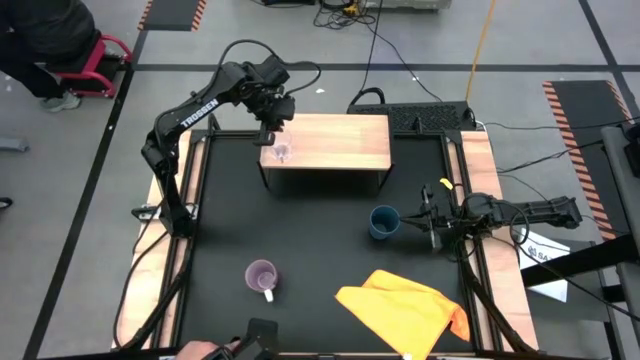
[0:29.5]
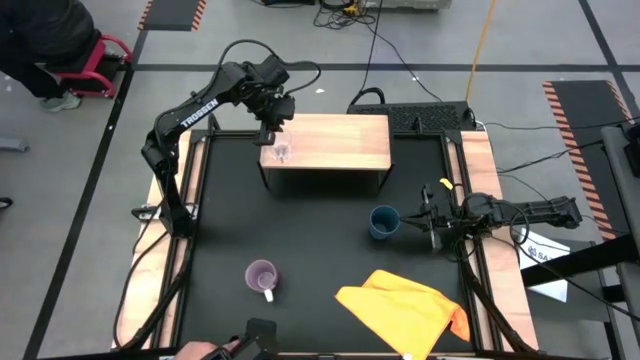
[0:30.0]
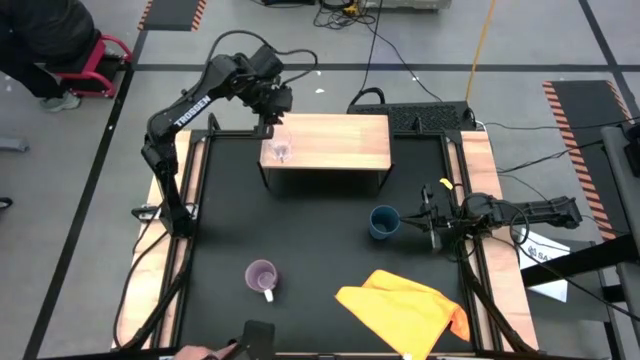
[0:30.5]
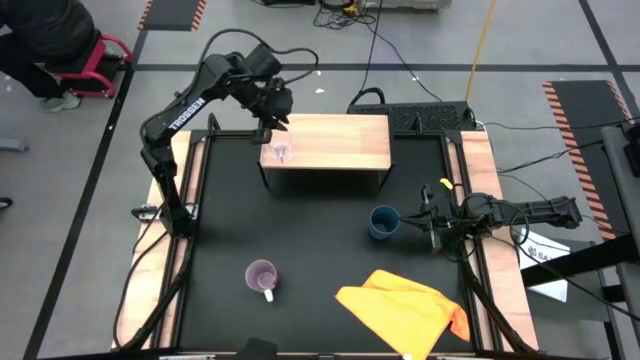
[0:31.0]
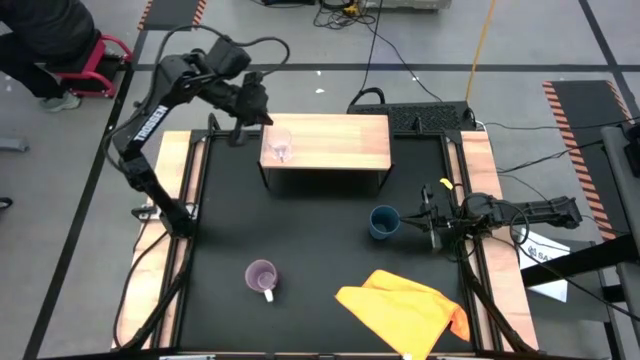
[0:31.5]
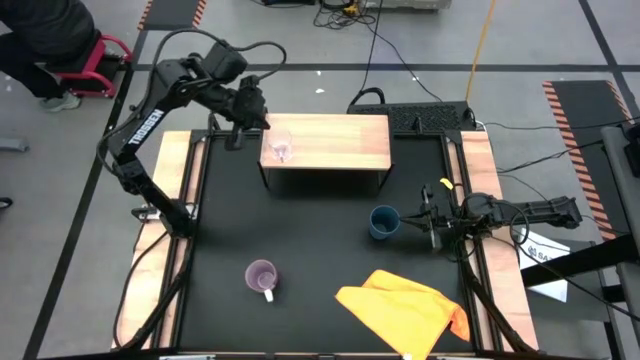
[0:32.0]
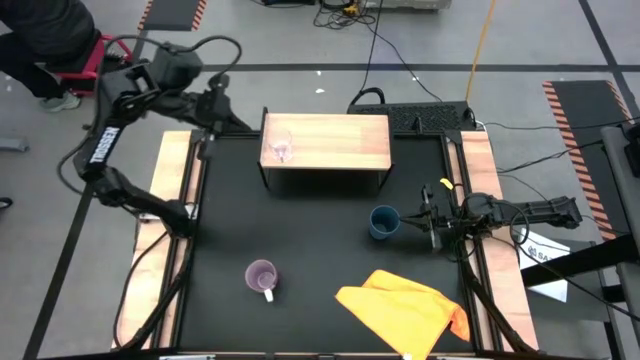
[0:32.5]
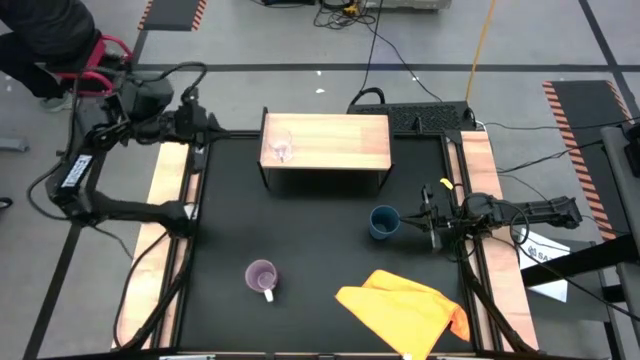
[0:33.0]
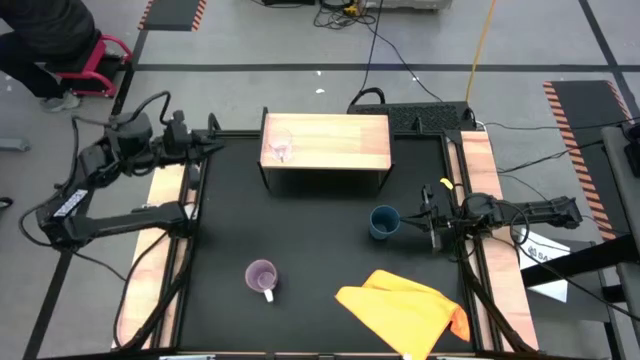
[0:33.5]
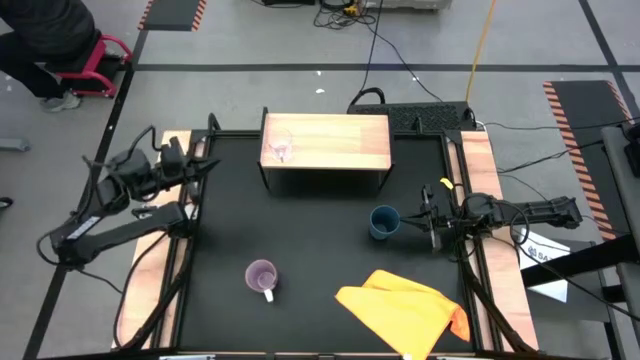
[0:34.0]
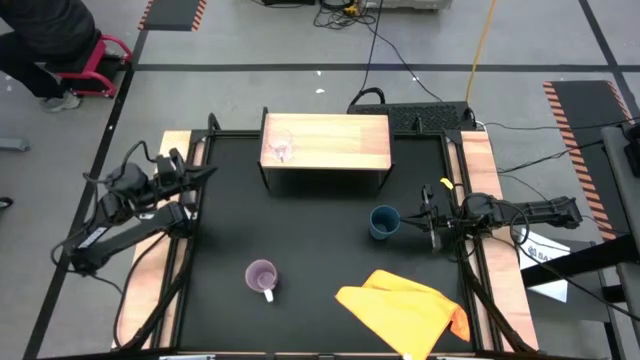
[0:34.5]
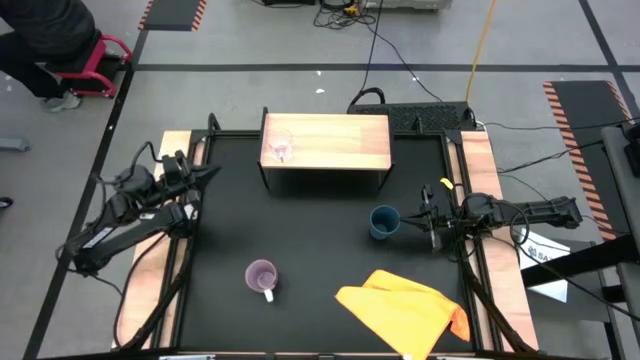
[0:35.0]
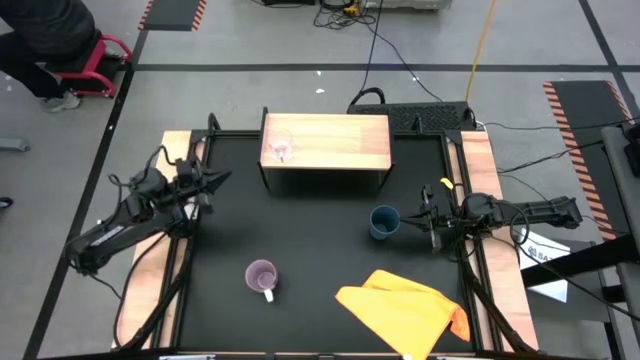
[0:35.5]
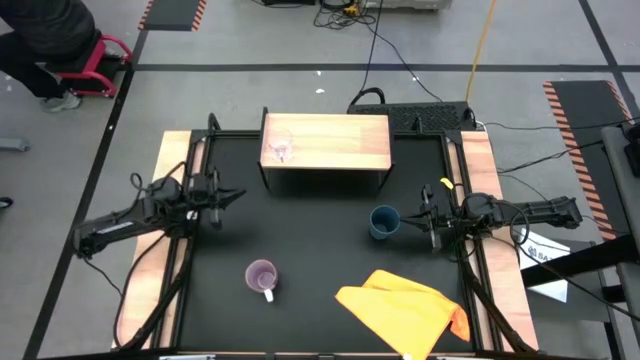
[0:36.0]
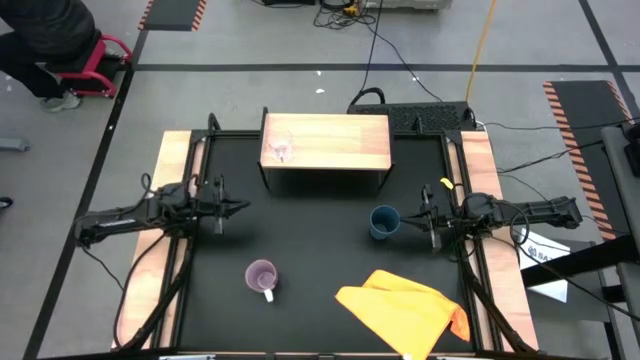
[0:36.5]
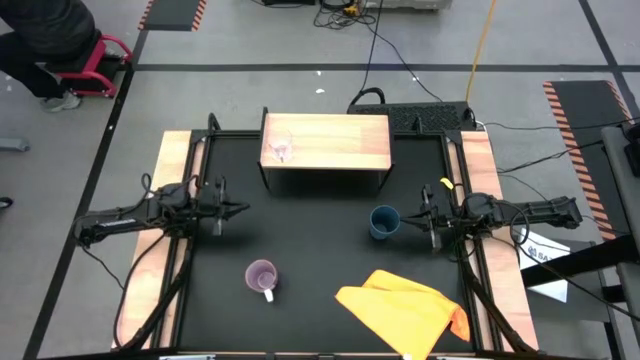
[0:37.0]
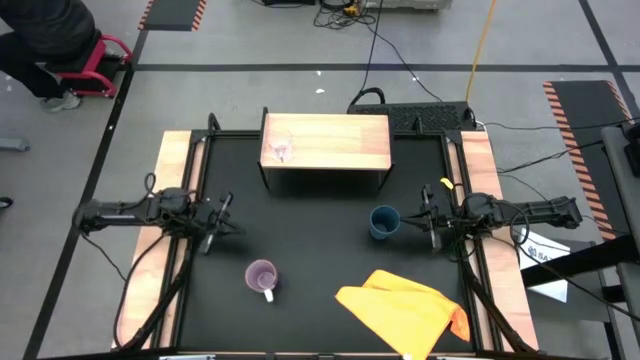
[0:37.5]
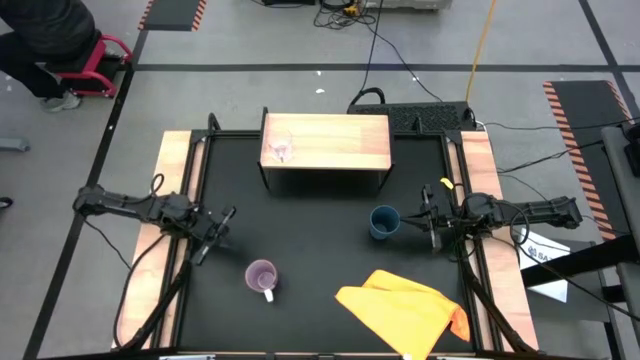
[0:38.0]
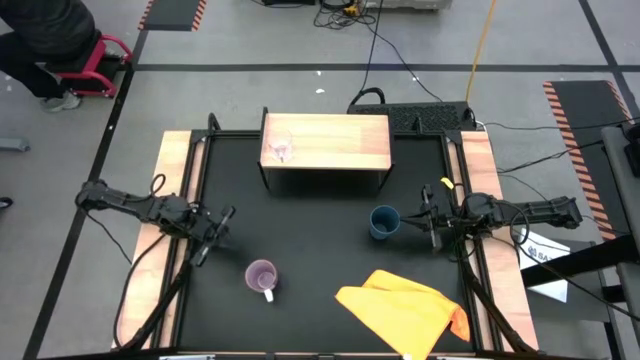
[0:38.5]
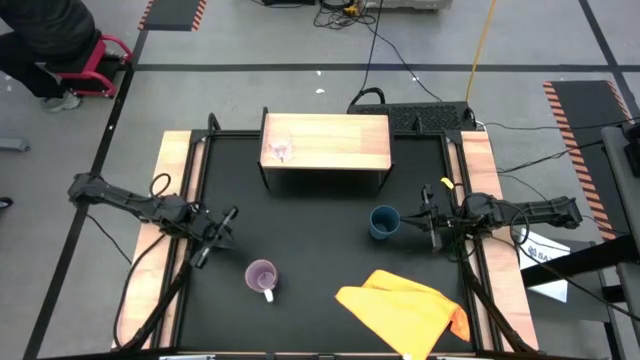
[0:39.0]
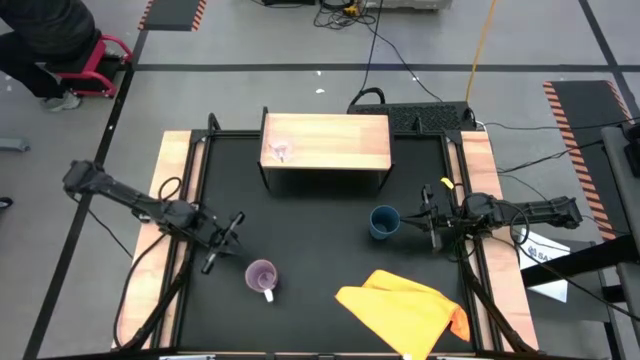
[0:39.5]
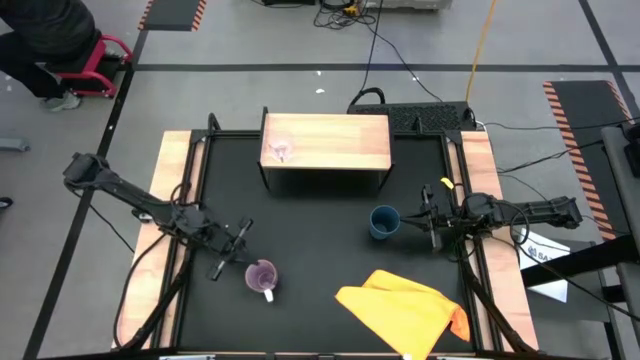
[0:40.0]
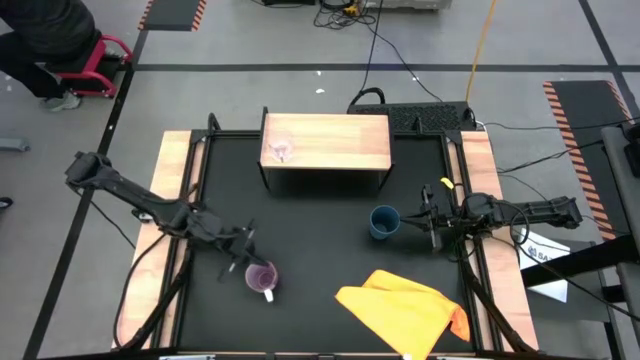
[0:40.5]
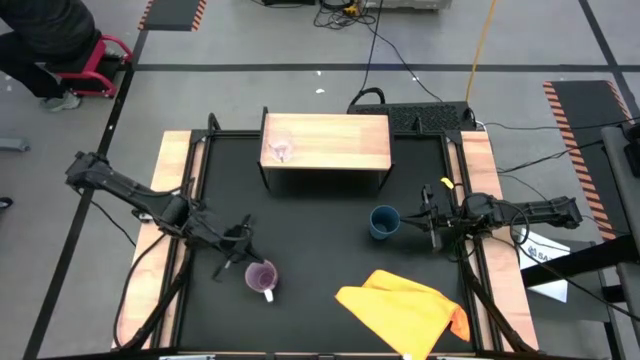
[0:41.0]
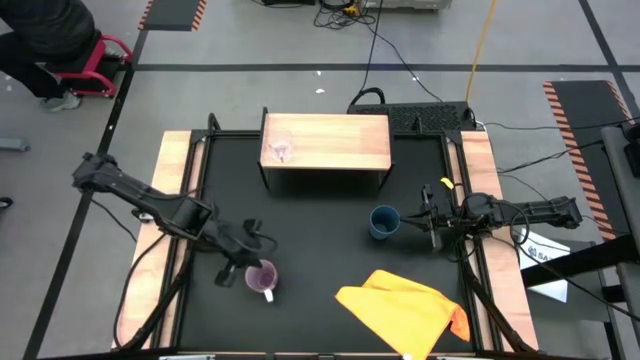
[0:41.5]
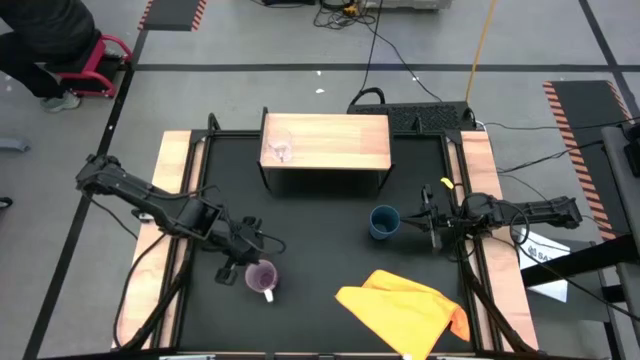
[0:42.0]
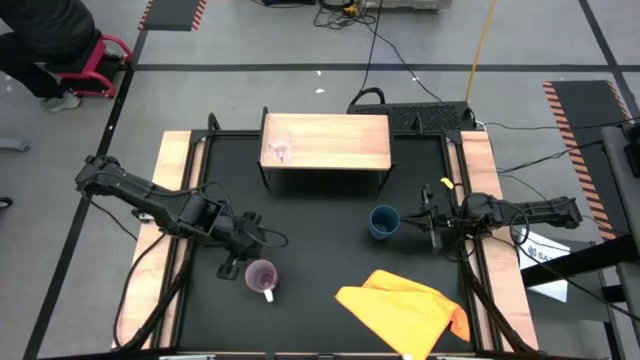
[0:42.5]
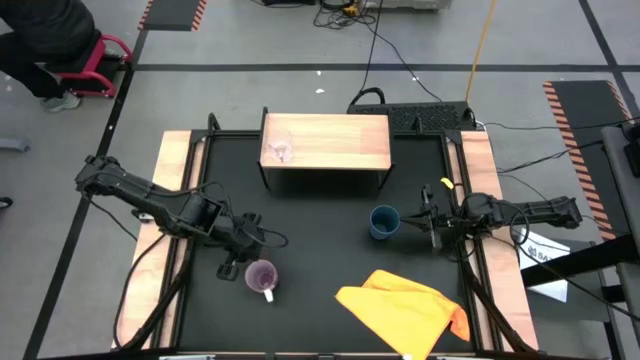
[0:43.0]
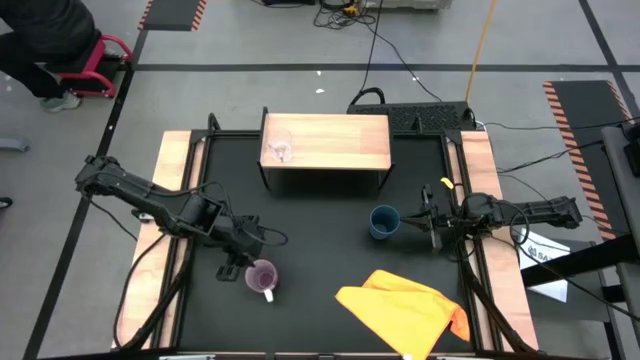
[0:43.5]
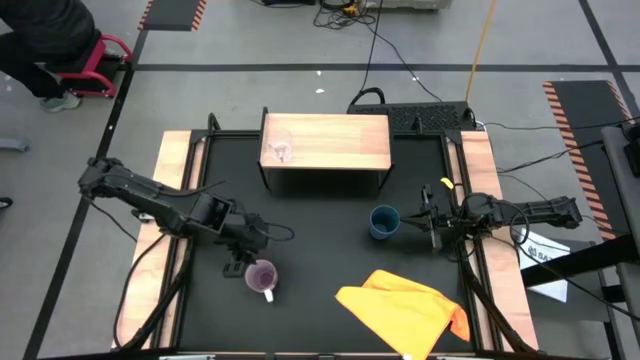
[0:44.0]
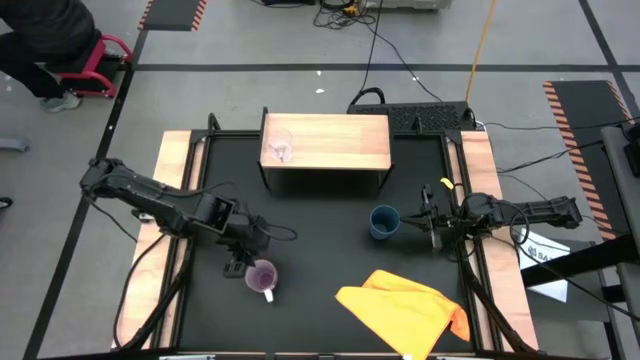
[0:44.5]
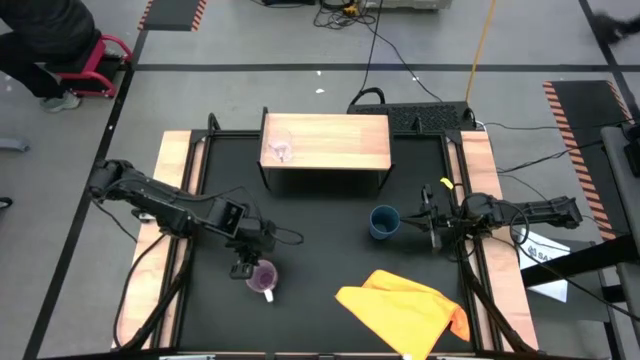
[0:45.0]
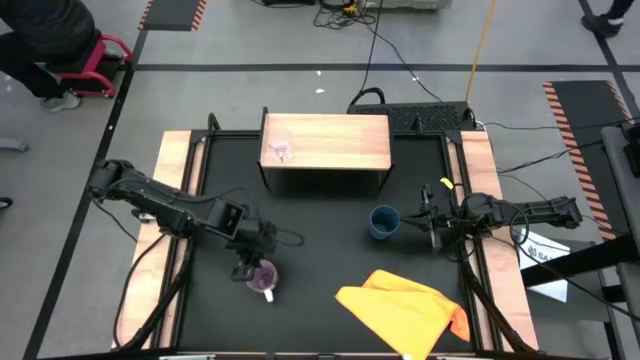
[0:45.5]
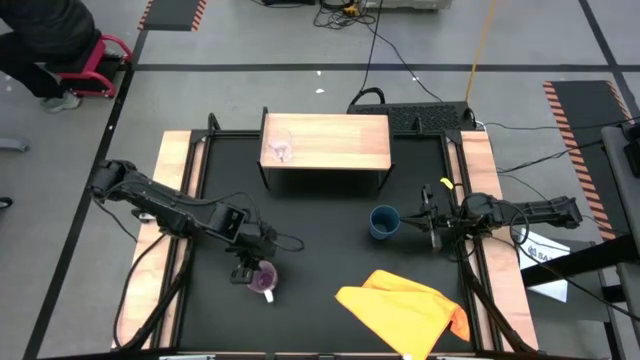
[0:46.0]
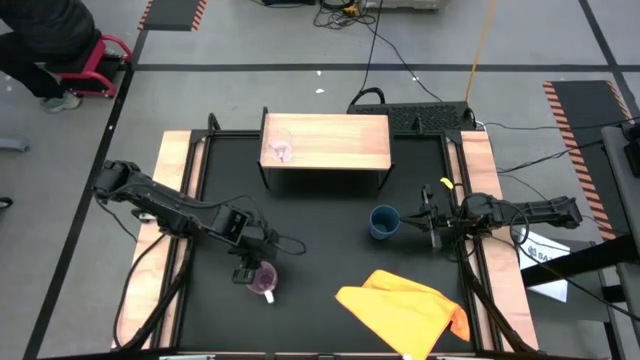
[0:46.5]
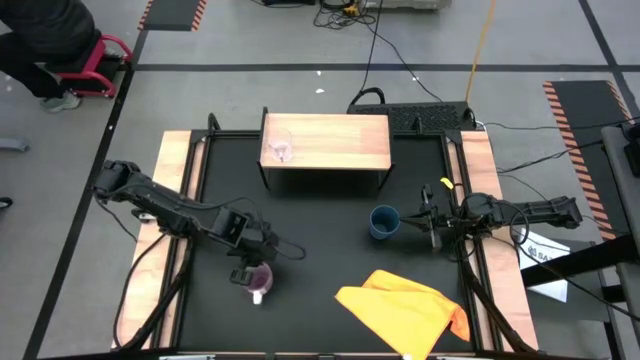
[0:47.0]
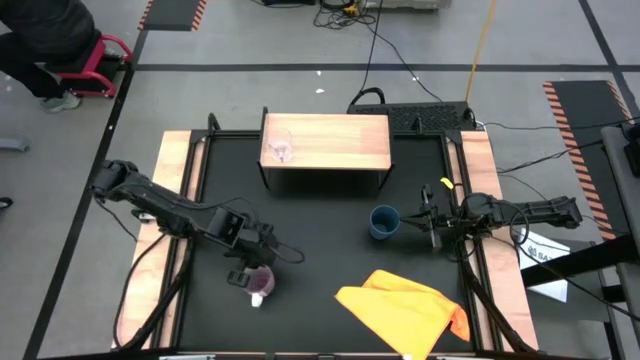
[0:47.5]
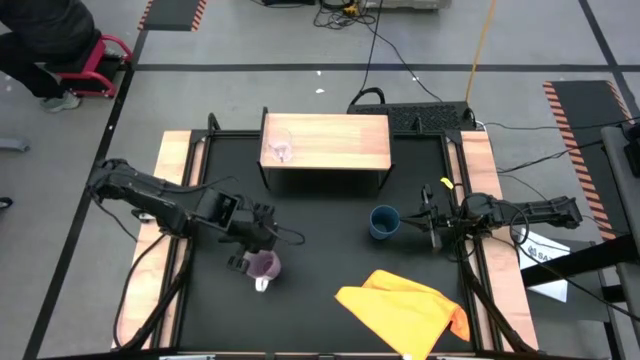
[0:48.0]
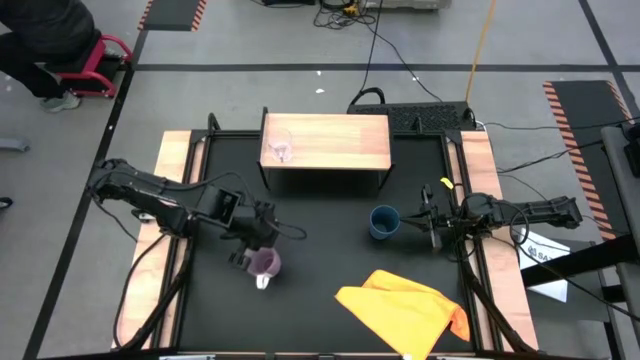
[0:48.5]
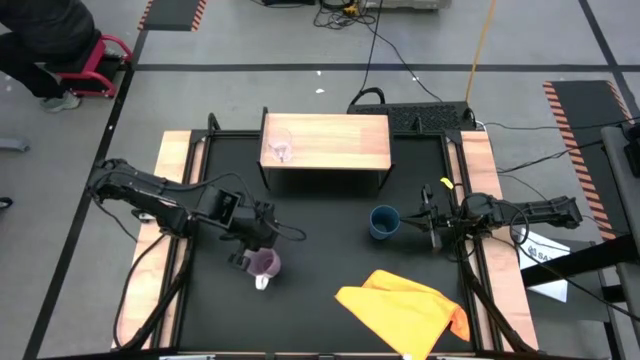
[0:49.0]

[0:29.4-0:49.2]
Task: Stack small to large cups/mugs on shelf
Put the violet patterned mug on the shelf
